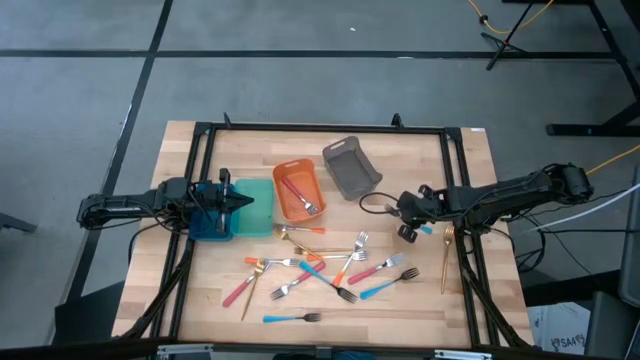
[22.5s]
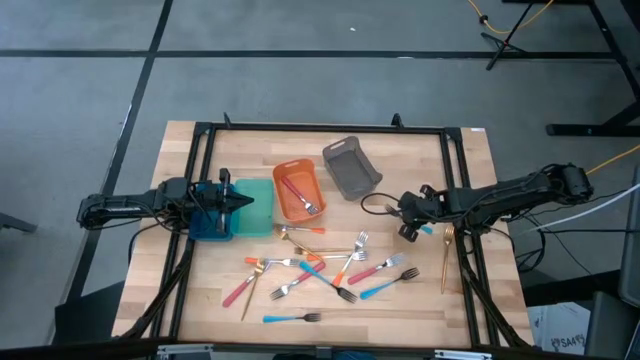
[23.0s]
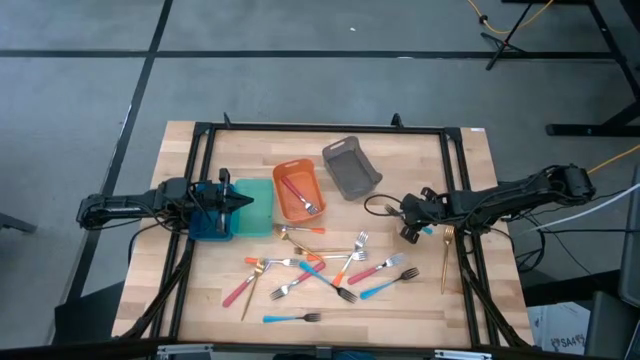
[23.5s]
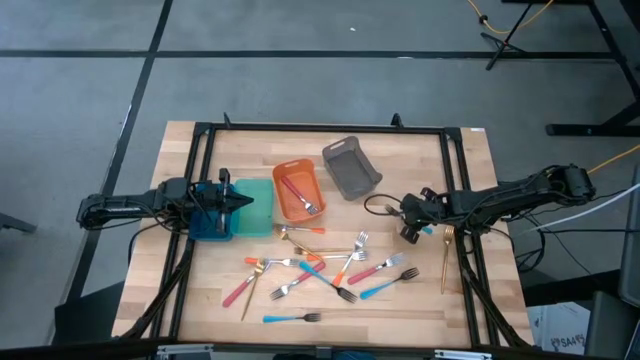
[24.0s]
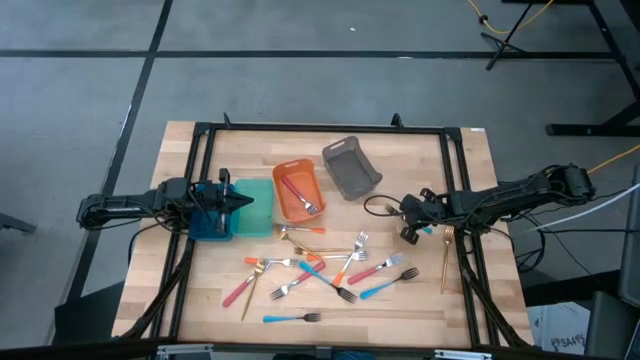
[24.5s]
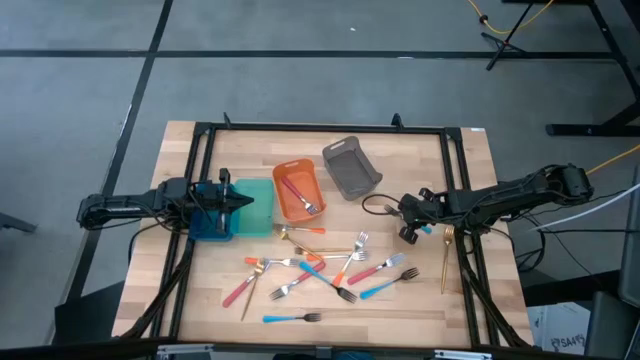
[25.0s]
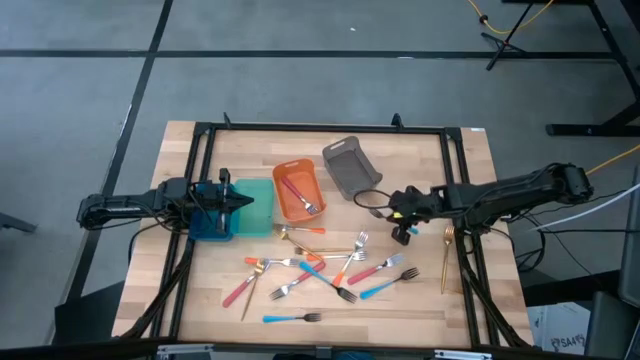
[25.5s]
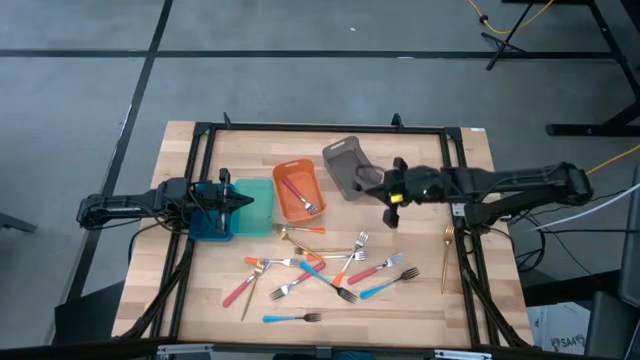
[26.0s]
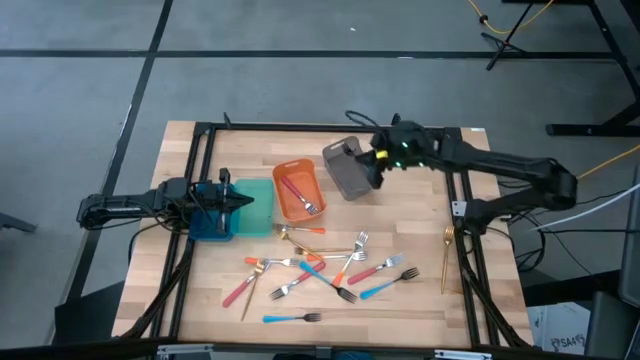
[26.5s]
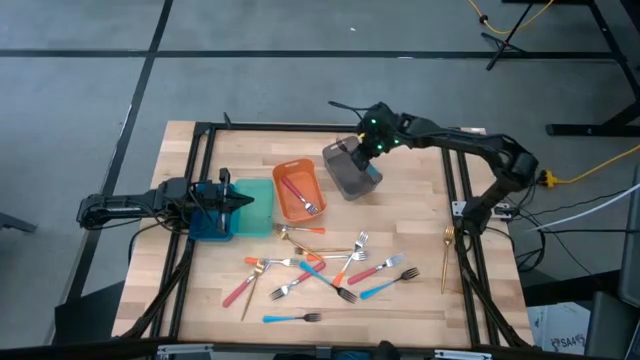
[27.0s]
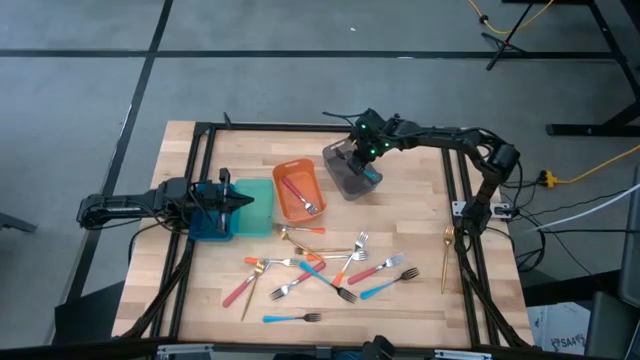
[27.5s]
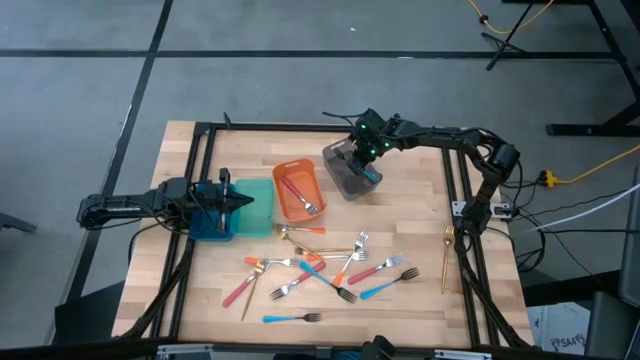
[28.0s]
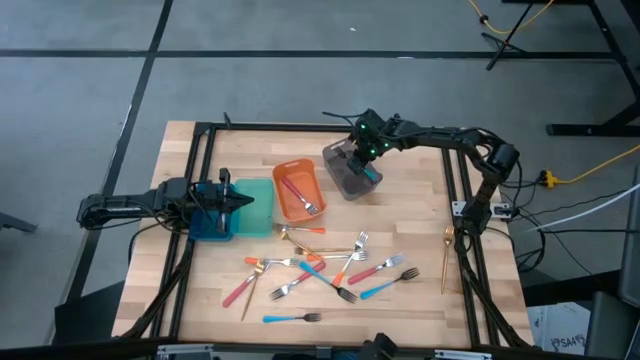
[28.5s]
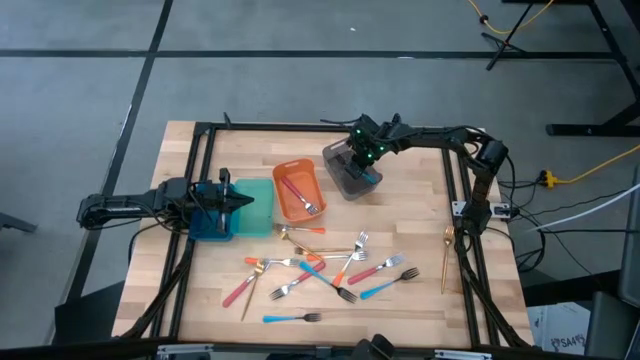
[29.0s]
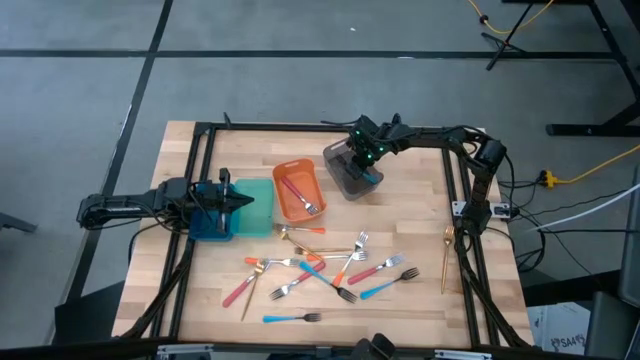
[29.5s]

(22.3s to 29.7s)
Task: Sort silverware by color (type)
Put the blue fork into the black bin

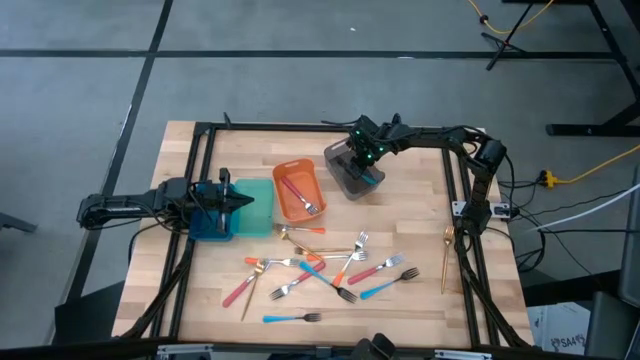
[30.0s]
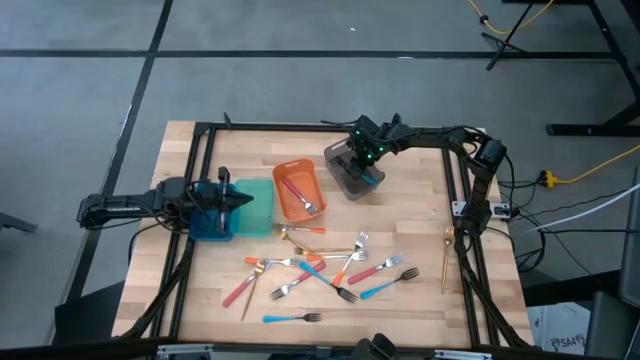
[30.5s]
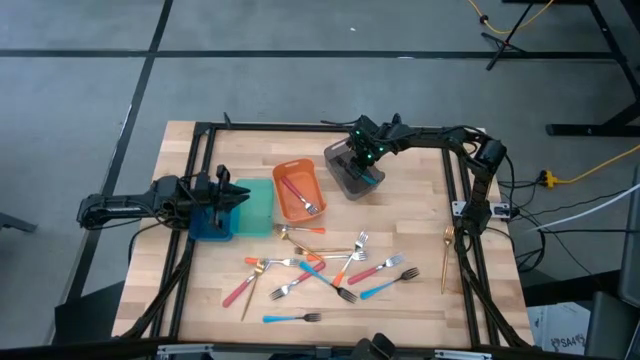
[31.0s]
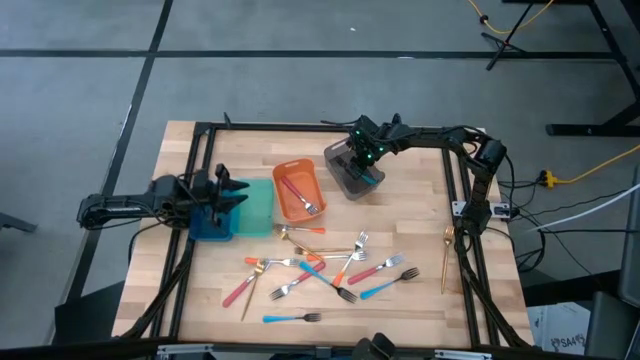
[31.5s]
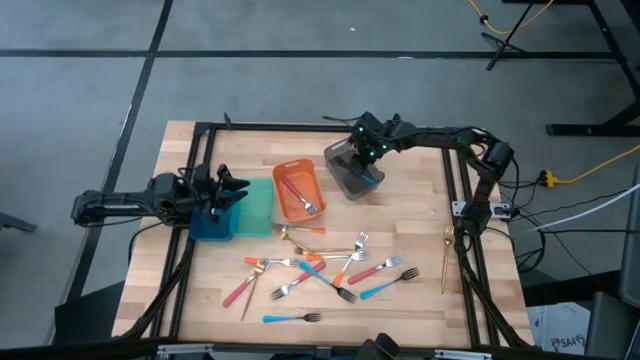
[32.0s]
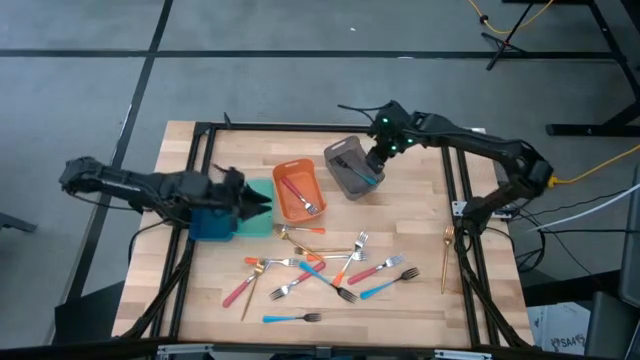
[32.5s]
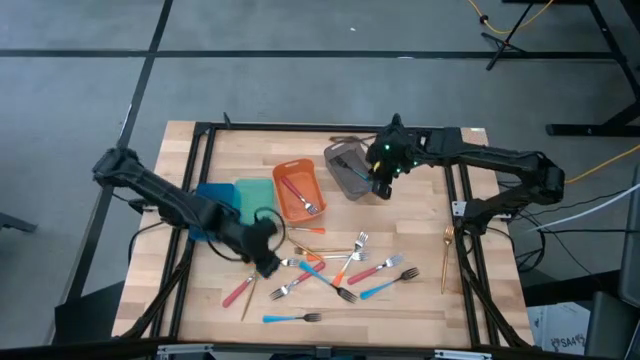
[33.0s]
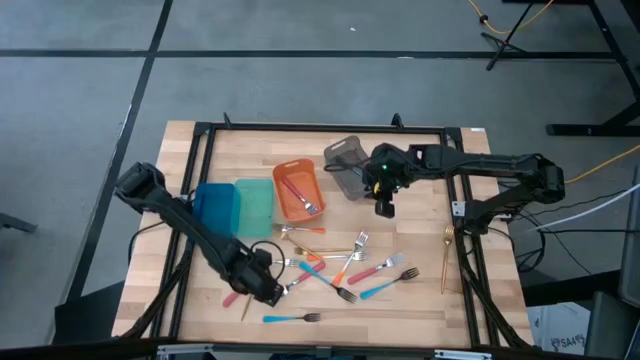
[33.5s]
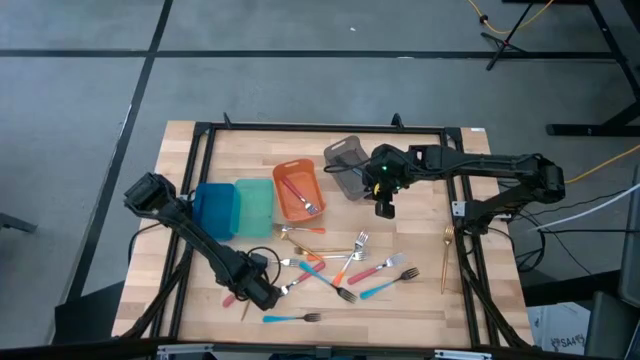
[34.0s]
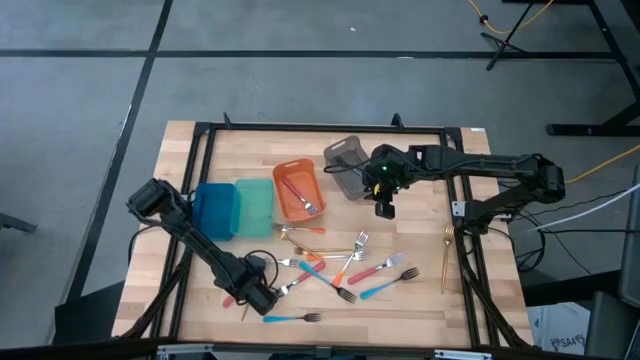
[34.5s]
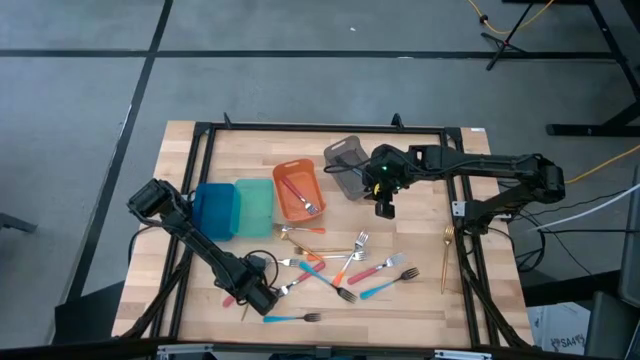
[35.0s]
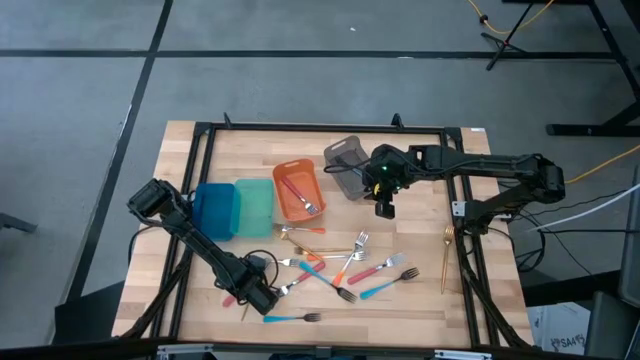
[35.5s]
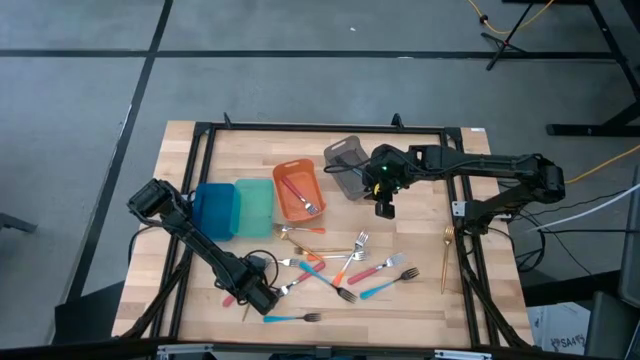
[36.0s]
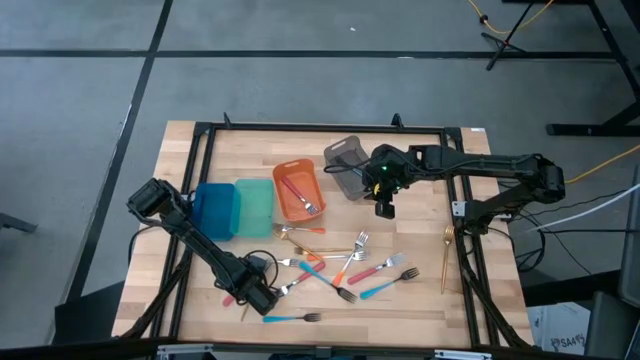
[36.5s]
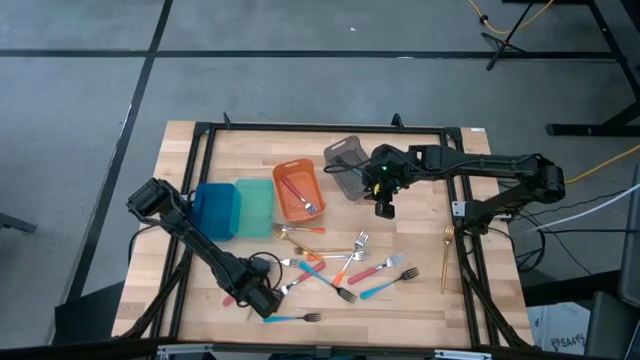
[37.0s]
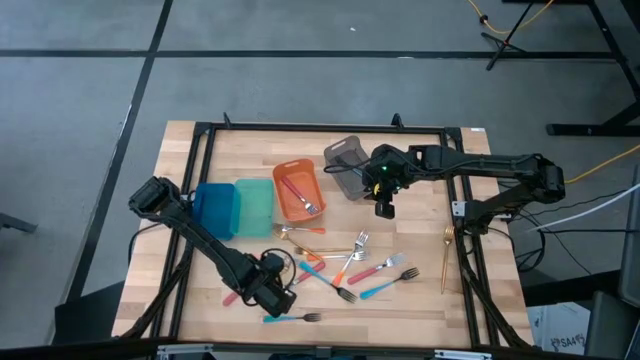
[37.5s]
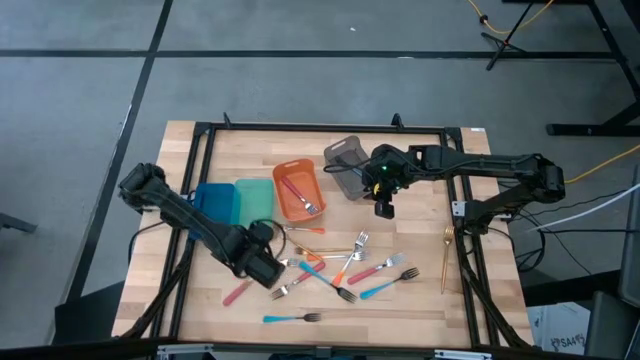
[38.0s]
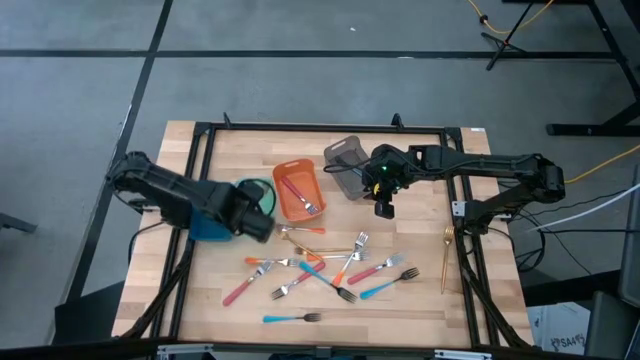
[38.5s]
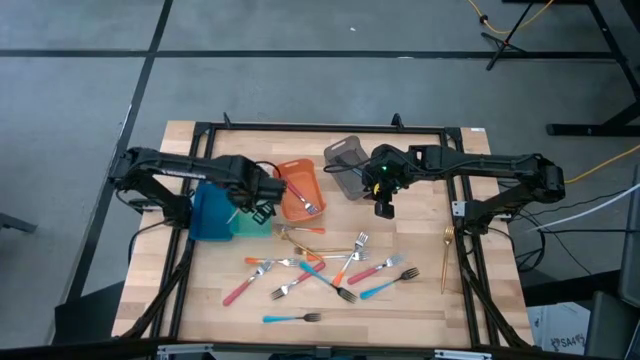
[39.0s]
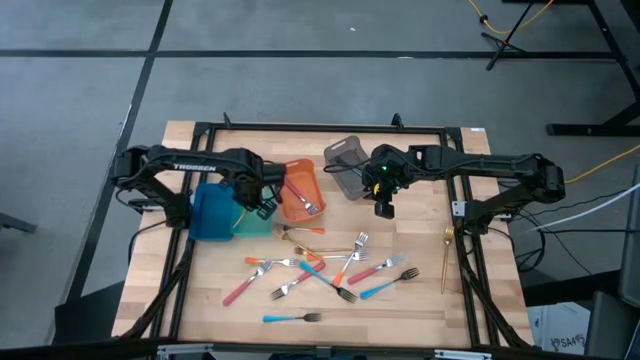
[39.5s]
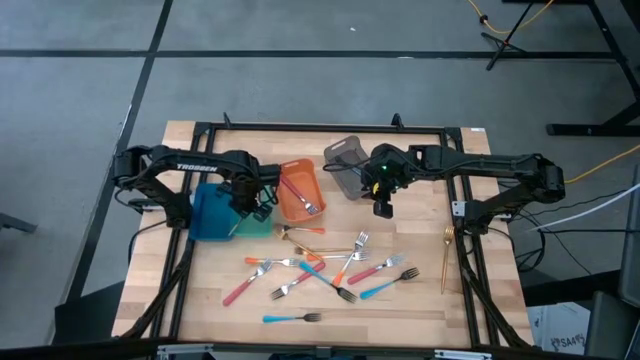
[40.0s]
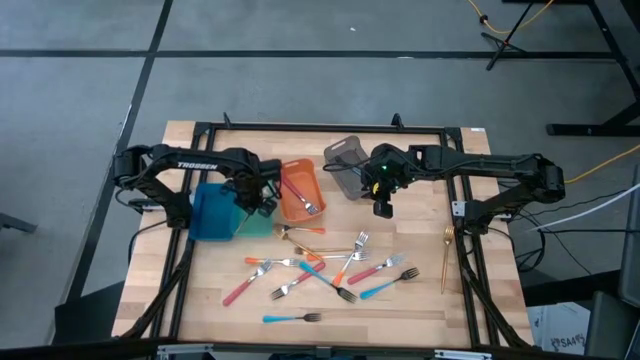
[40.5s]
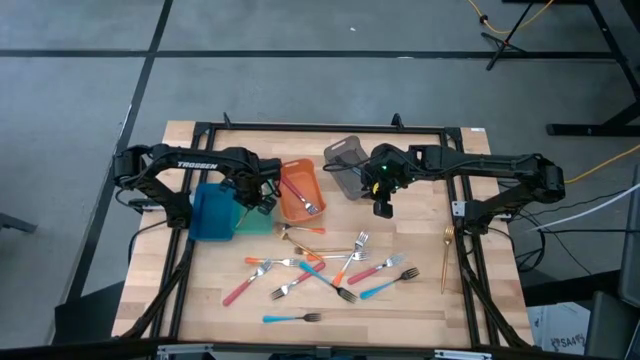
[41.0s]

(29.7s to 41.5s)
Put the gold fork into the light blue bin

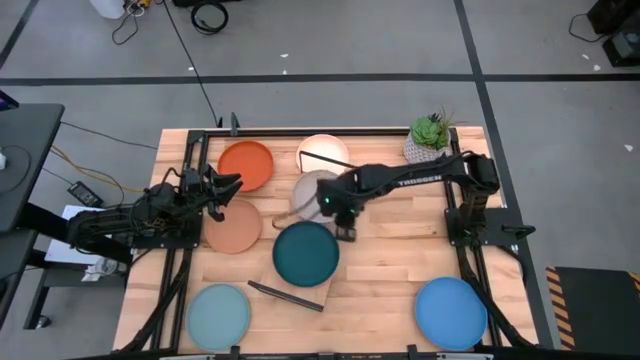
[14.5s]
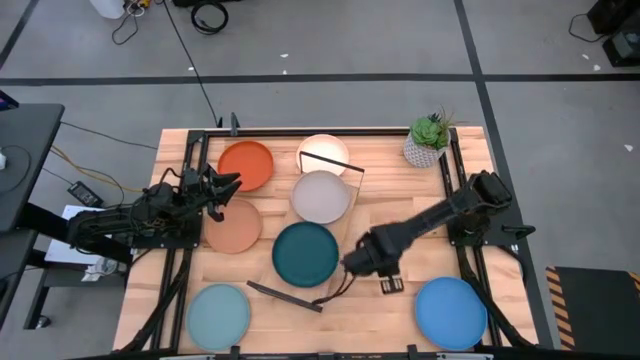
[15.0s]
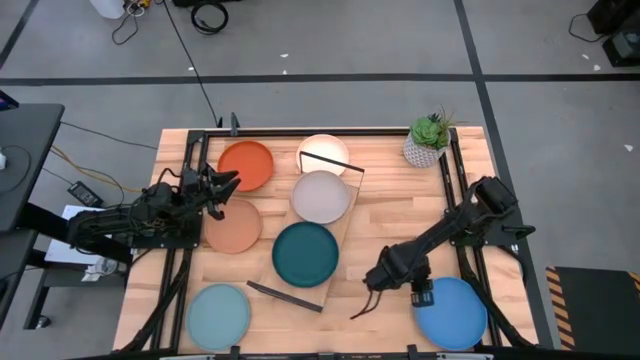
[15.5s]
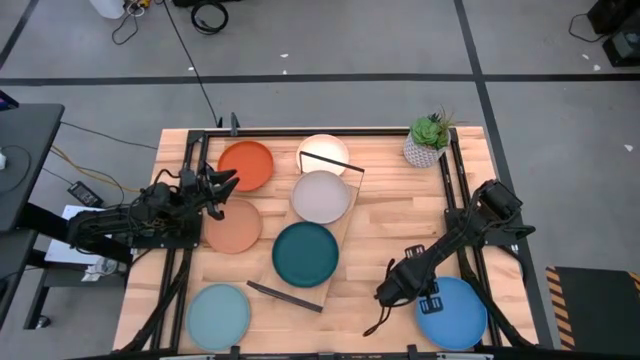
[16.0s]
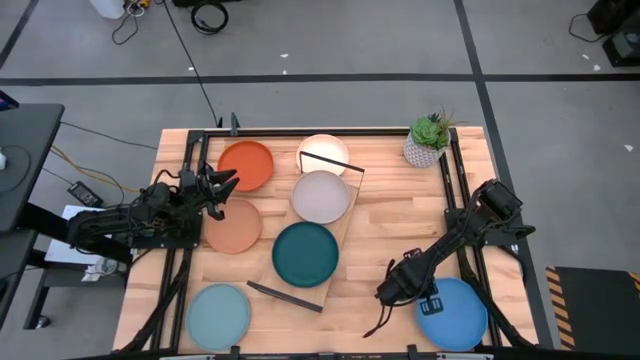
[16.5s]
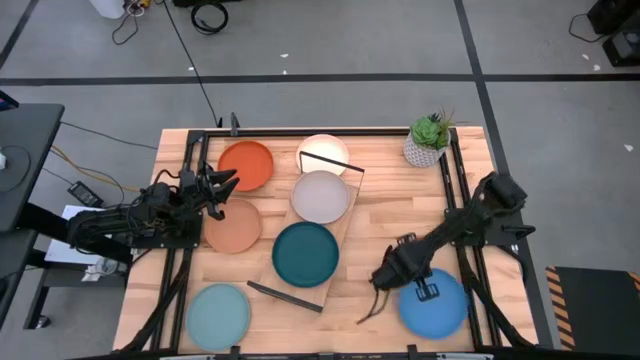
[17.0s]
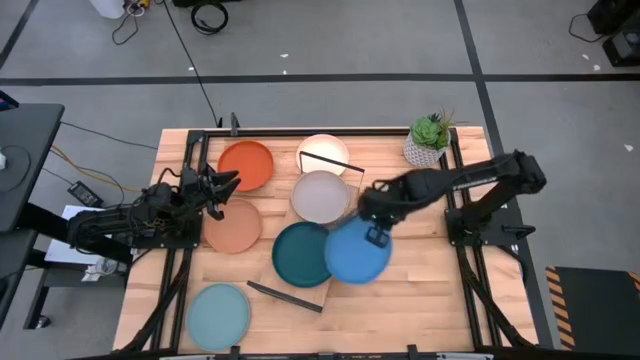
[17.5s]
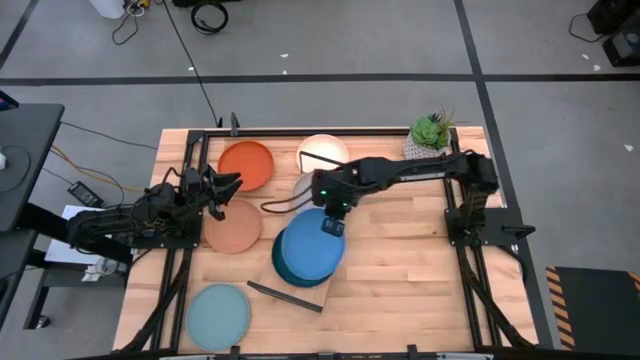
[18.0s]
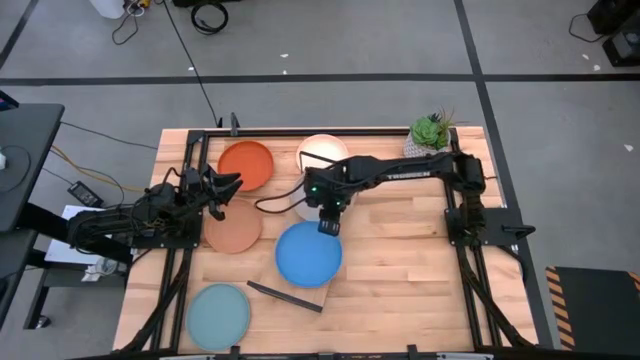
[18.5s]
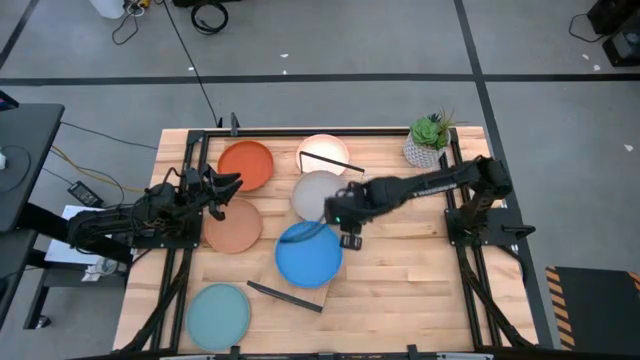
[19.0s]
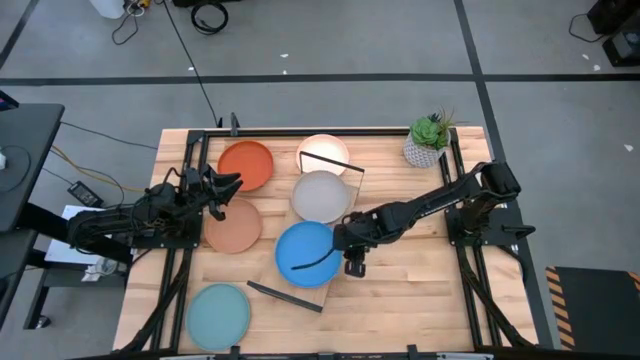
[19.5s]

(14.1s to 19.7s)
Task: Place and stack plates onto a shelf
Stack the blue plate on top of the dark blue plate on the shelf
